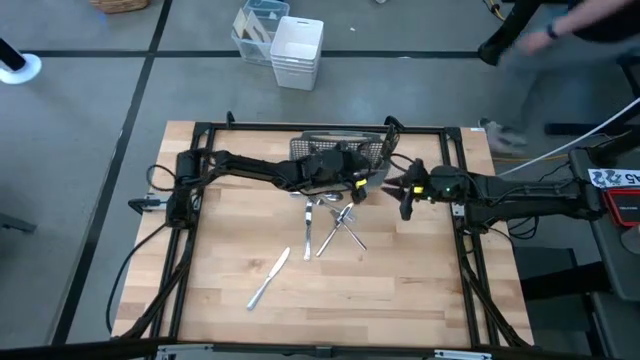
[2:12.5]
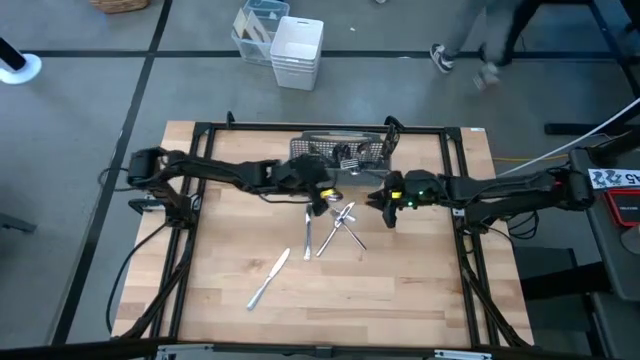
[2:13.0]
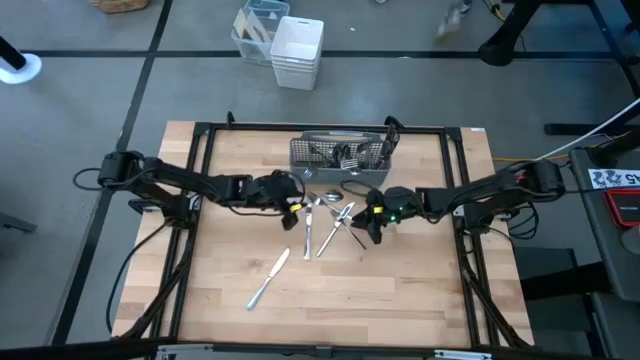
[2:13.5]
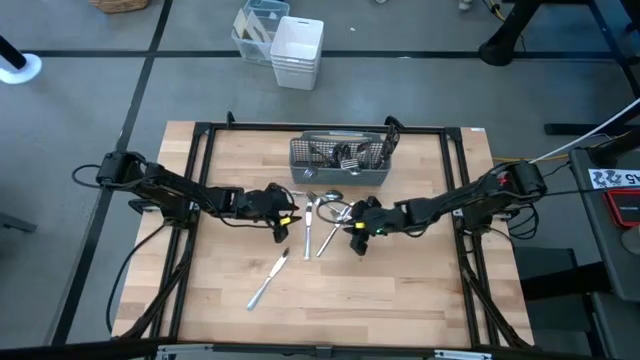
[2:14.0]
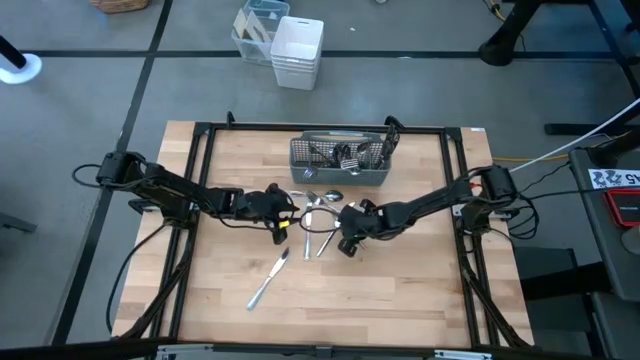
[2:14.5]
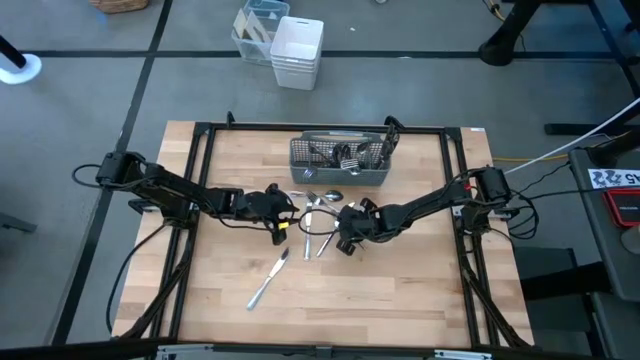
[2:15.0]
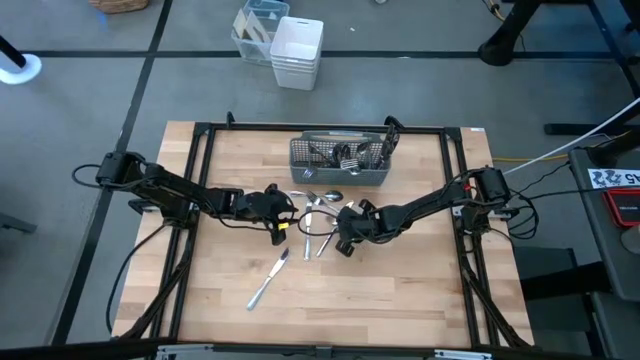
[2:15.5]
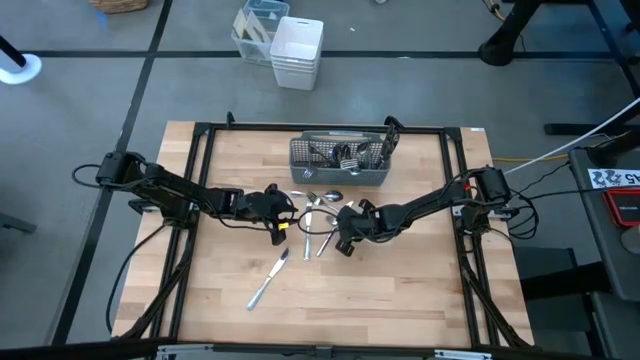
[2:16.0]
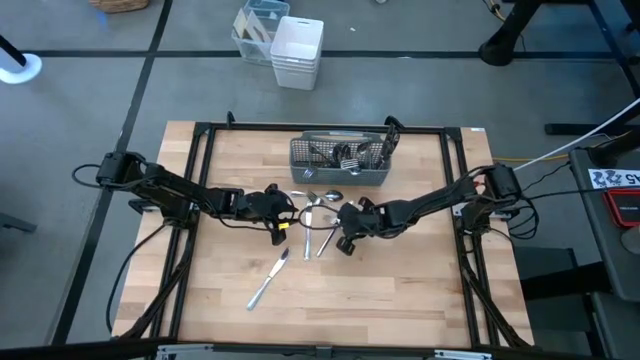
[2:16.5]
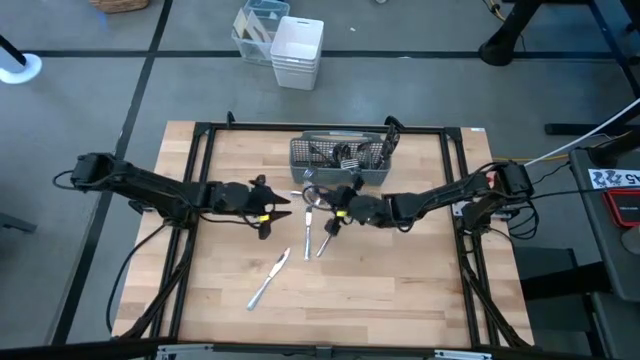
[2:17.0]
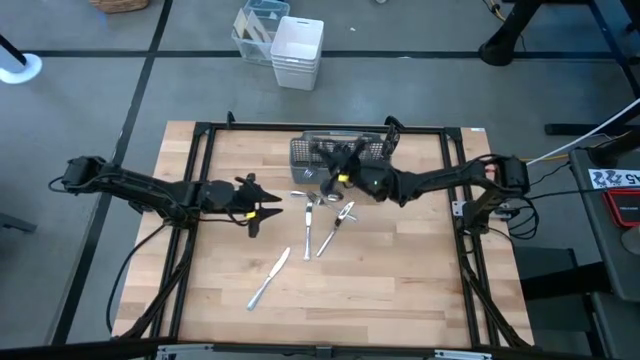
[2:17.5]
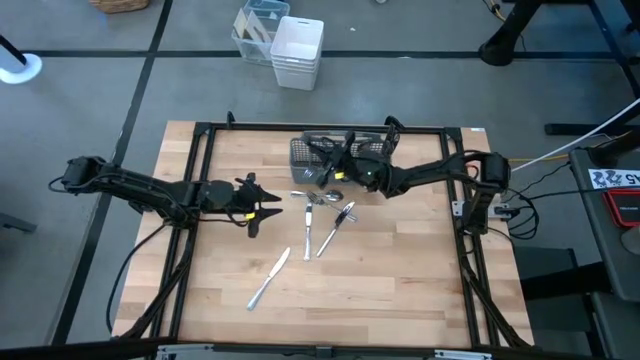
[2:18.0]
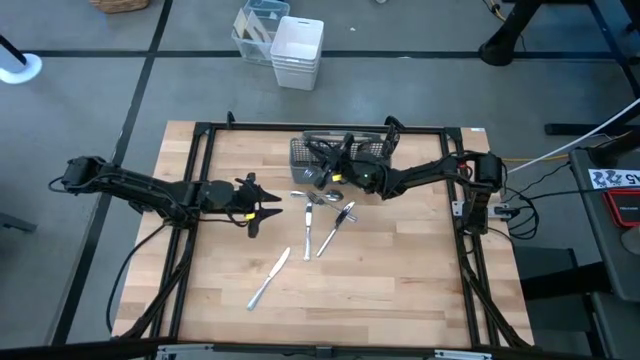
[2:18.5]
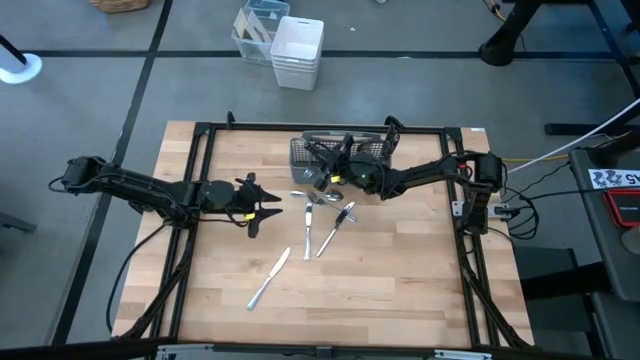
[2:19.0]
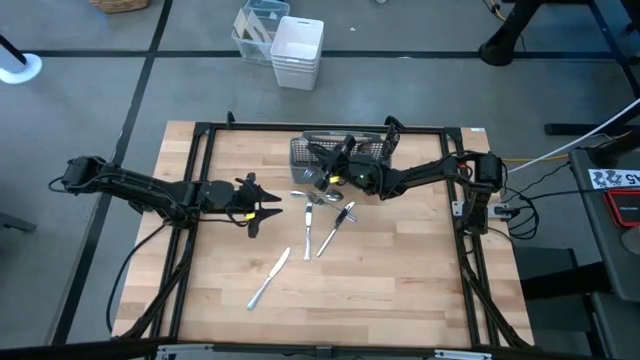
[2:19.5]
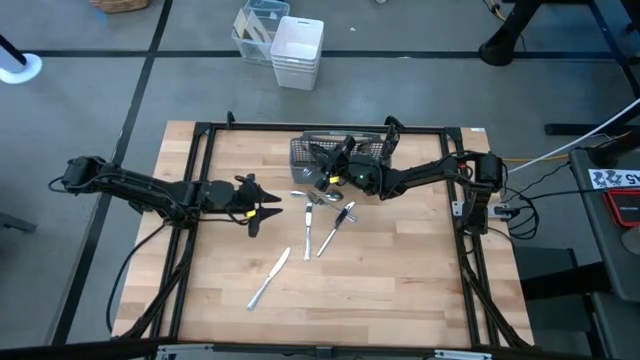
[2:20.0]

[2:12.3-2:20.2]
Task: Sort silverware
Put the fork into the silverware rack

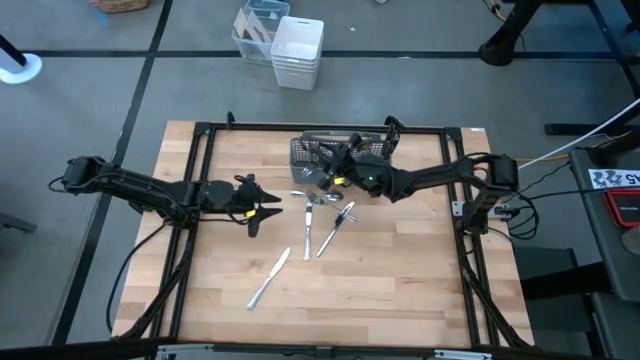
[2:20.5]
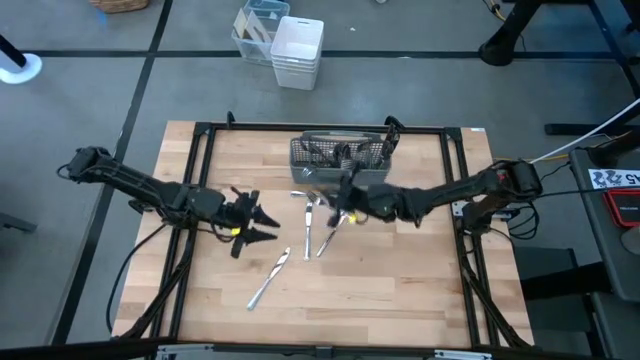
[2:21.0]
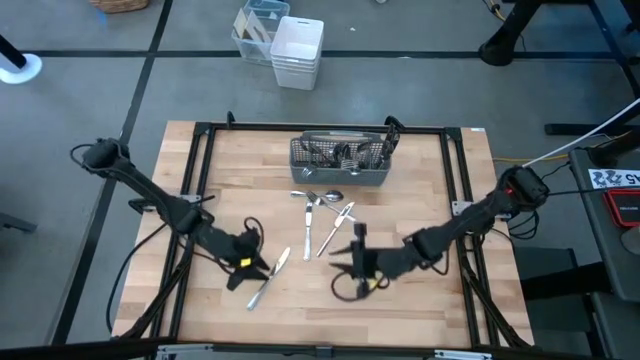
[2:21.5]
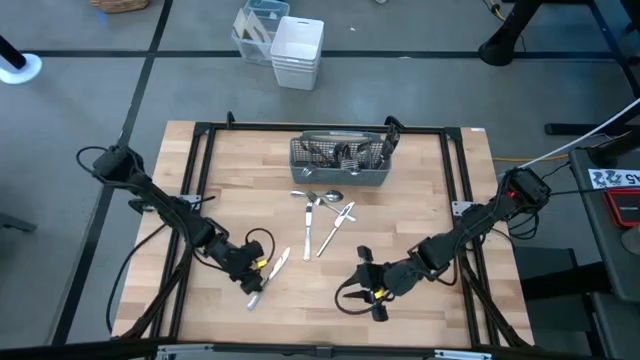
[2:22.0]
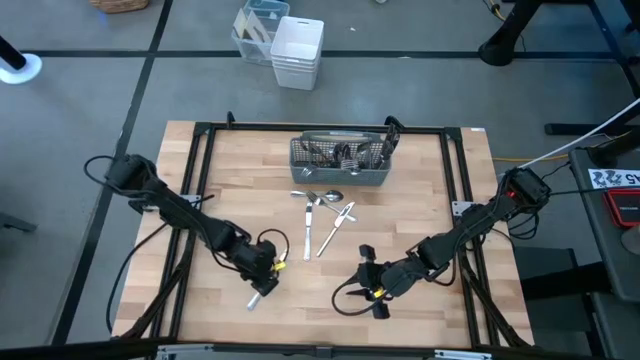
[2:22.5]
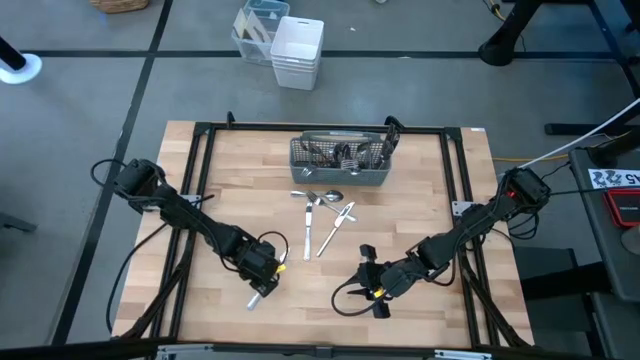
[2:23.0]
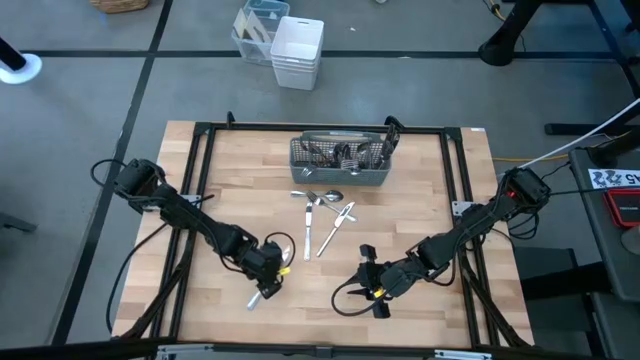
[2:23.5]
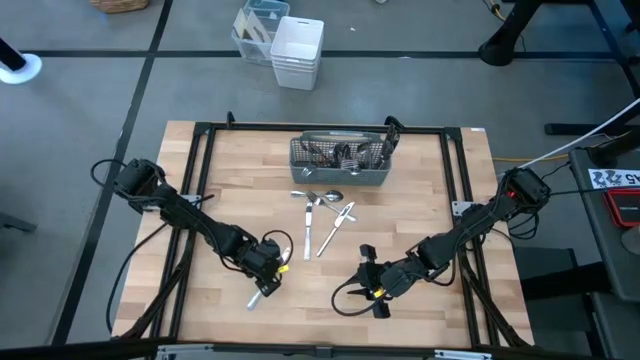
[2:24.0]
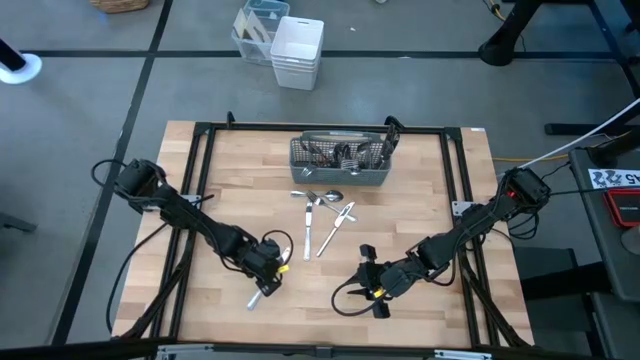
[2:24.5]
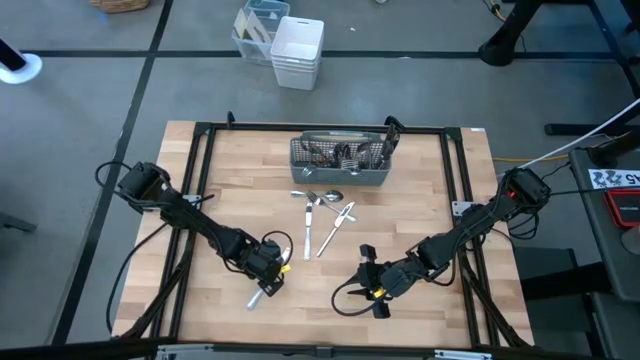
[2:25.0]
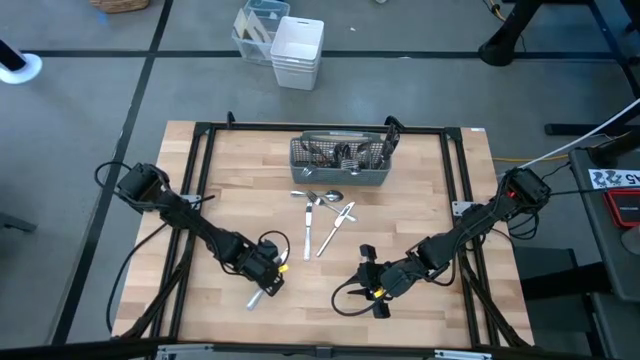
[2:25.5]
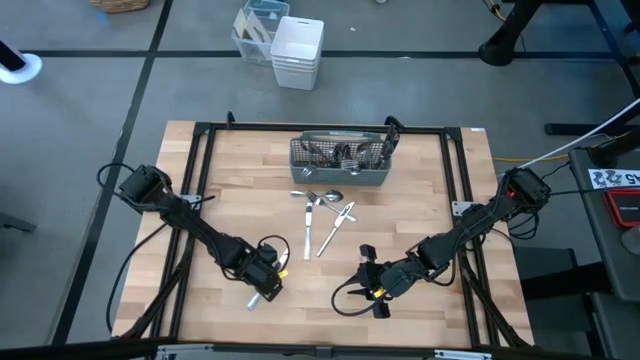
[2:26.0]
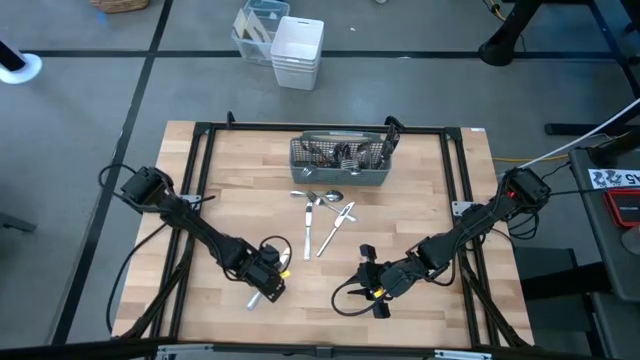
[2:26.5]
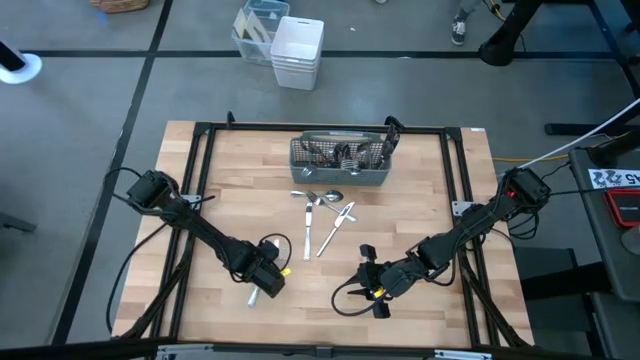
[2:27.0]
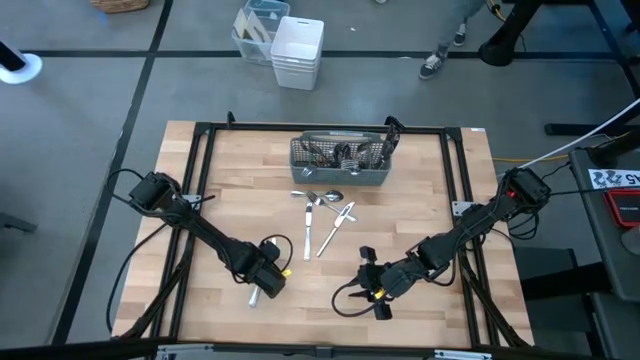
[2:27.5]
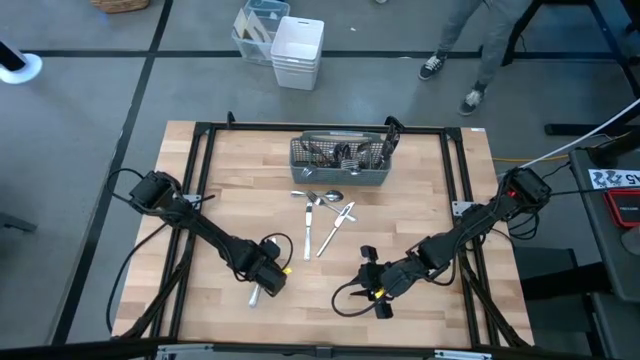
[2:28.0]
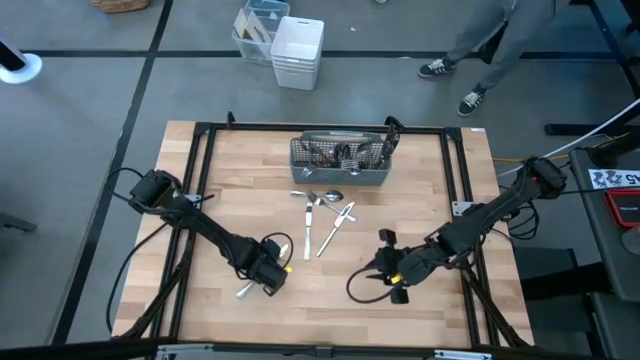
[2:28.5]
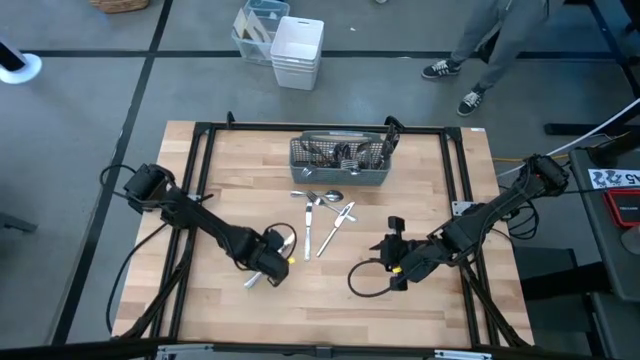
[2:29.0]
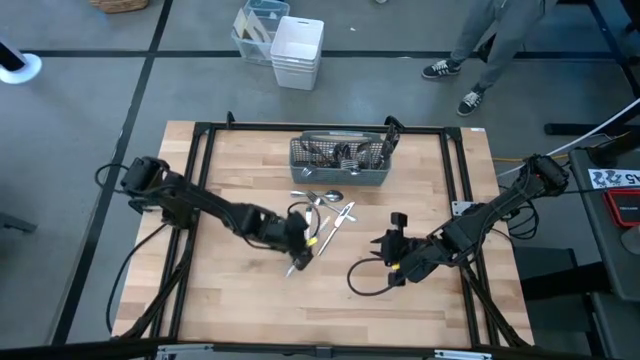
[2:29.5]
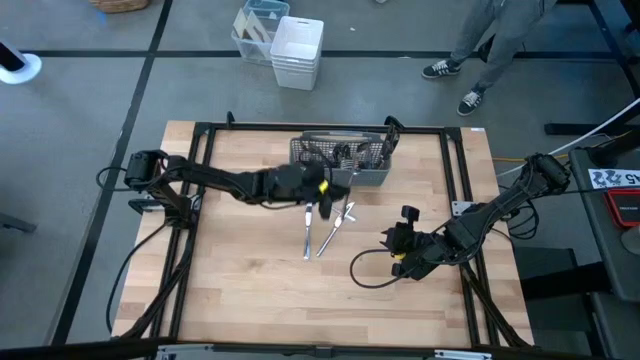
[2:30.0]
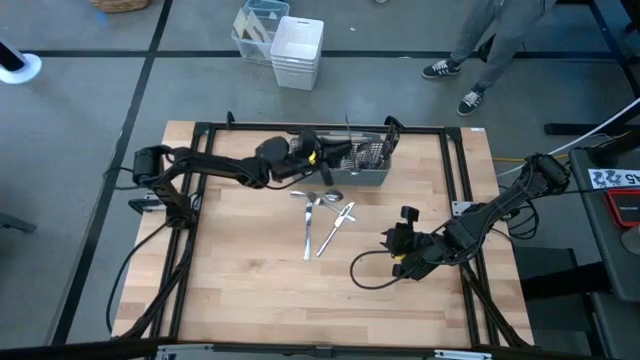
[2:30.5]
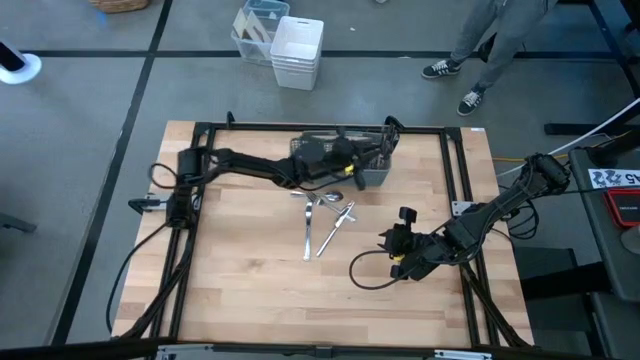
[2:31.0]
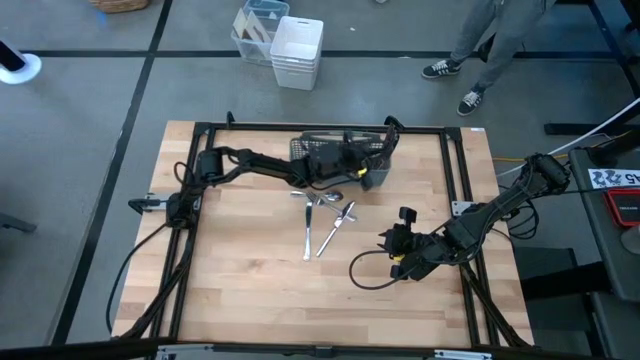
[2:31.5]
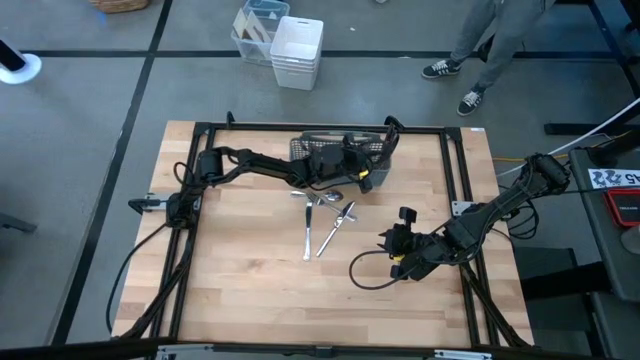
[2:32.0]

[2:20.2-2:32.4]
Put the knife into the silverware rack

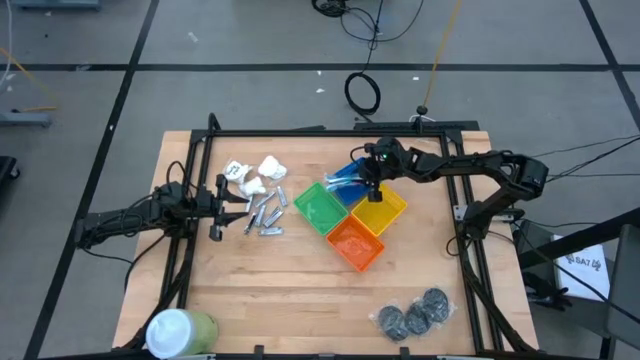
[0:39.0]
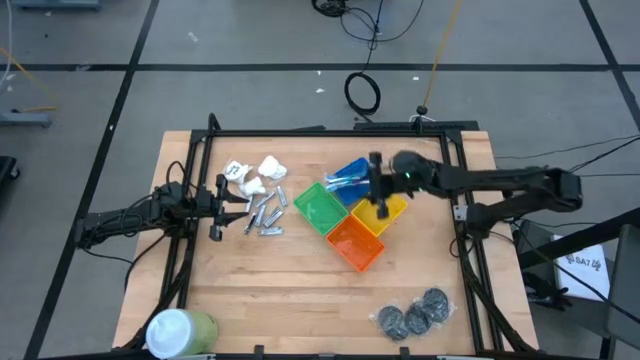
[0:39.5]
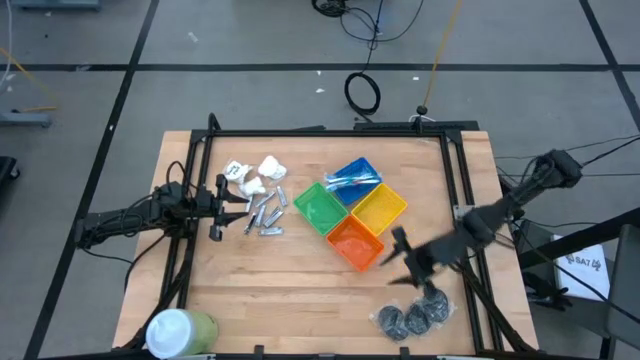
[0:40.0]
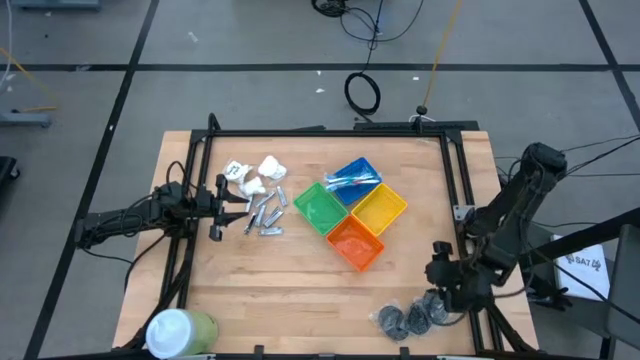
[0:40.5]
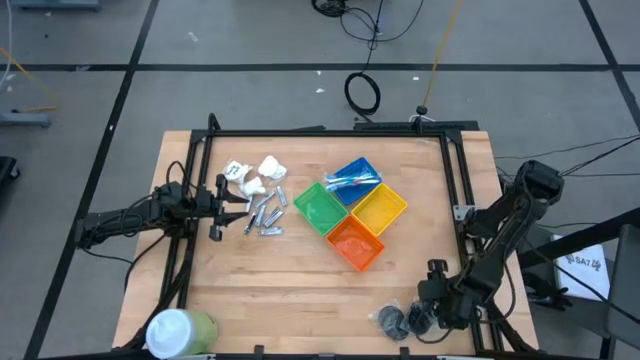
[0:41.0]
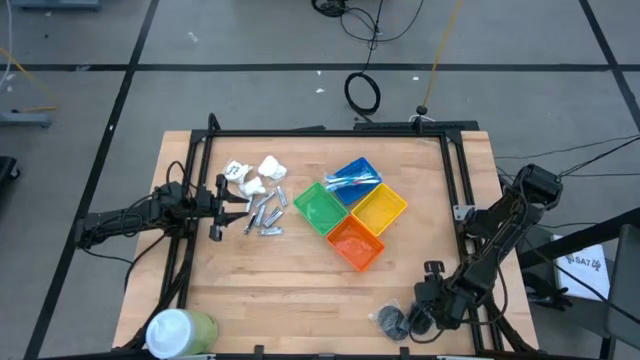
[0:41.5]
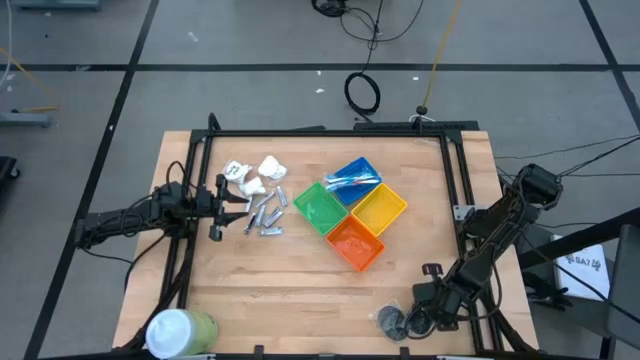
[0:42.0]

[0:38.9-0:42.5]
Task: Pick & Place Travel size toiletries
Put the black hairbrush into the yellow bin
